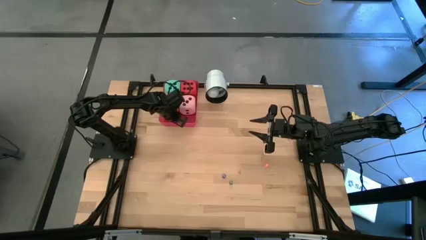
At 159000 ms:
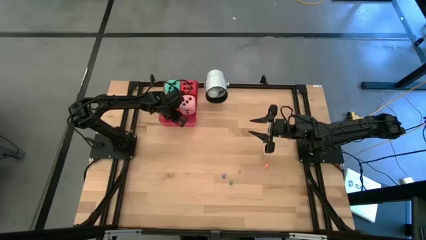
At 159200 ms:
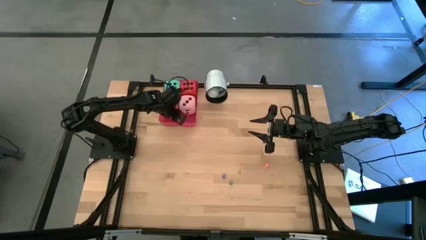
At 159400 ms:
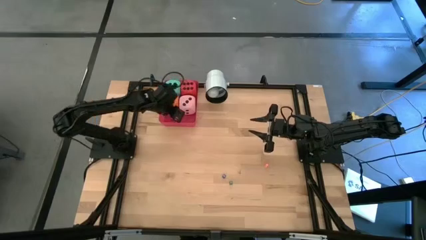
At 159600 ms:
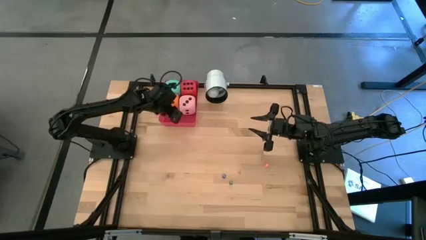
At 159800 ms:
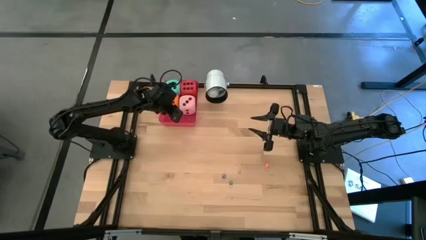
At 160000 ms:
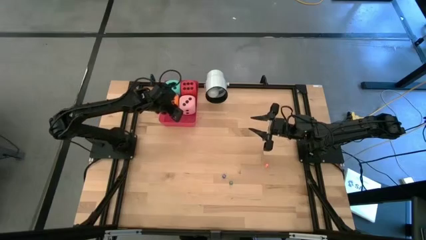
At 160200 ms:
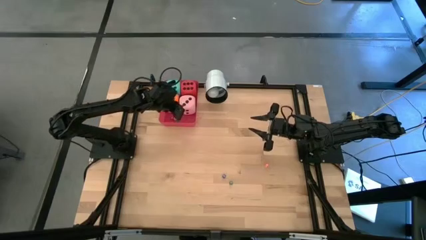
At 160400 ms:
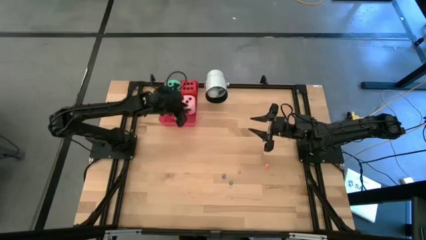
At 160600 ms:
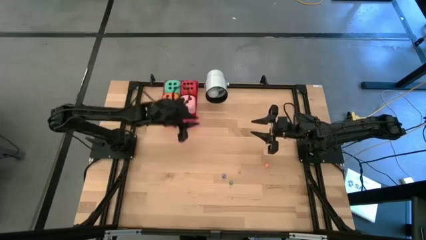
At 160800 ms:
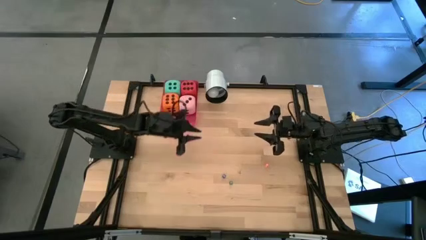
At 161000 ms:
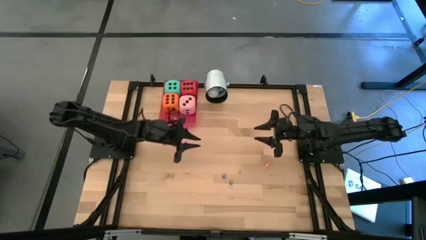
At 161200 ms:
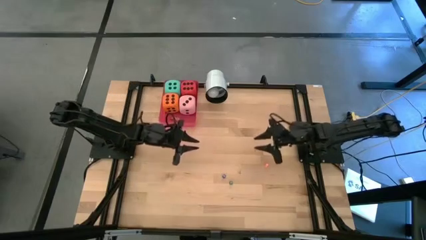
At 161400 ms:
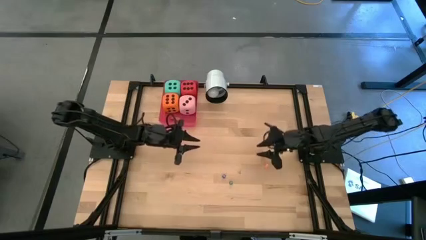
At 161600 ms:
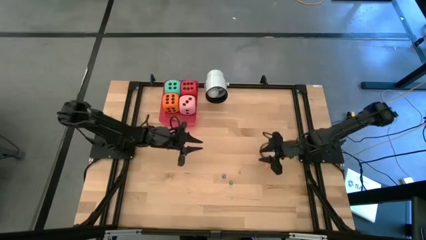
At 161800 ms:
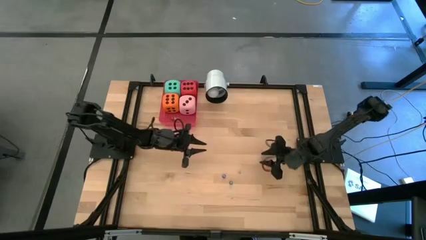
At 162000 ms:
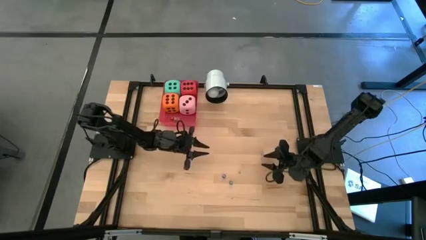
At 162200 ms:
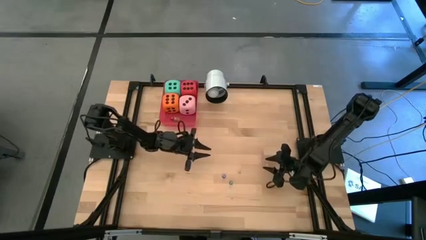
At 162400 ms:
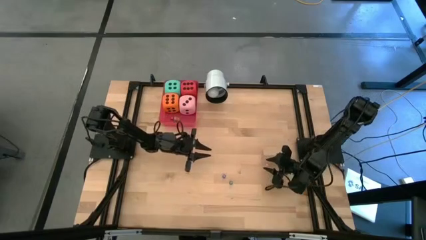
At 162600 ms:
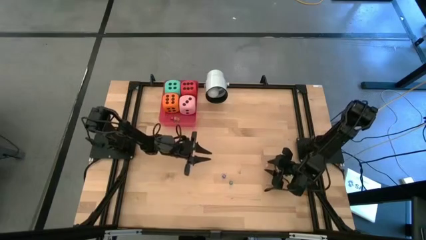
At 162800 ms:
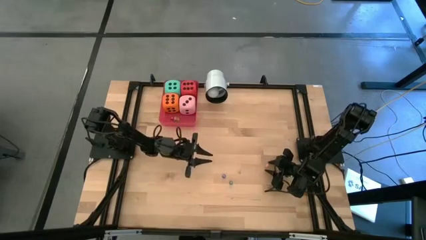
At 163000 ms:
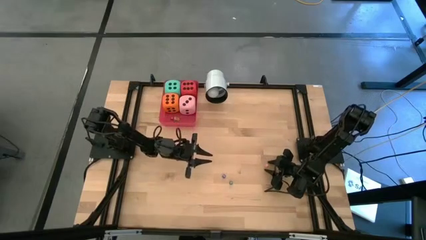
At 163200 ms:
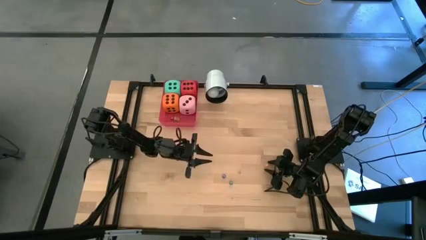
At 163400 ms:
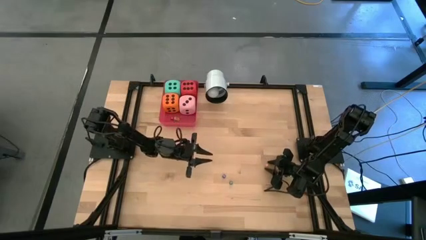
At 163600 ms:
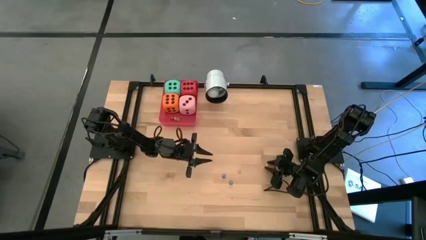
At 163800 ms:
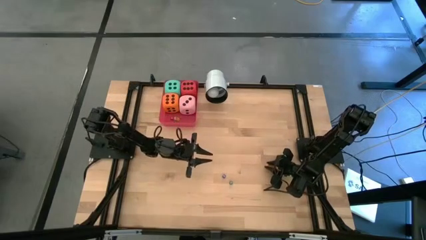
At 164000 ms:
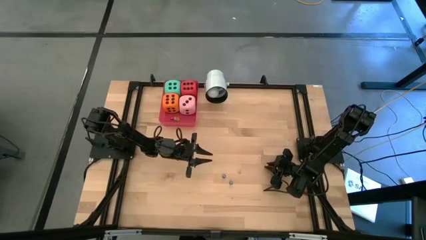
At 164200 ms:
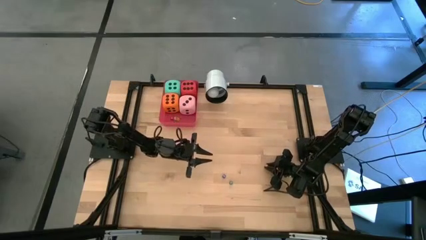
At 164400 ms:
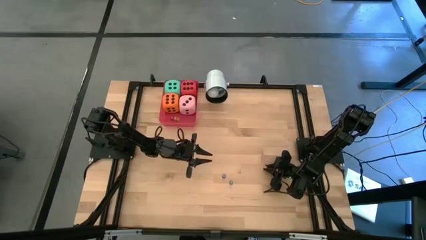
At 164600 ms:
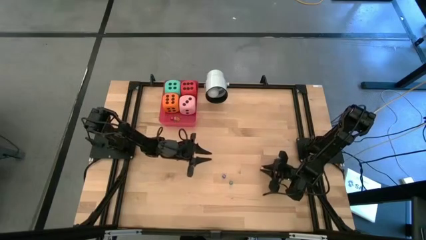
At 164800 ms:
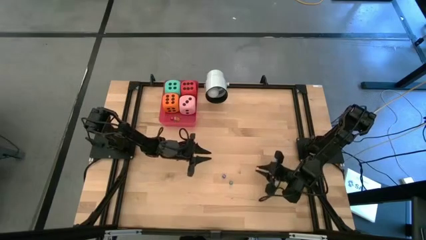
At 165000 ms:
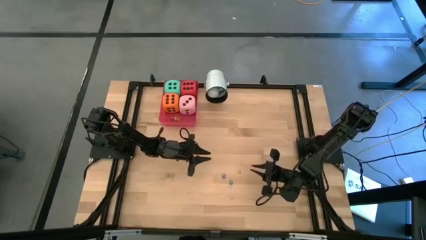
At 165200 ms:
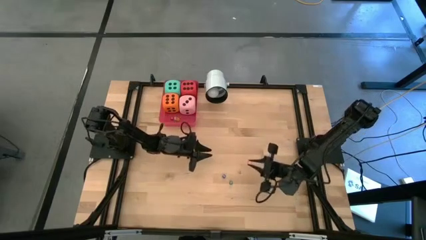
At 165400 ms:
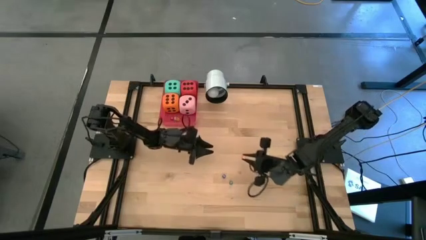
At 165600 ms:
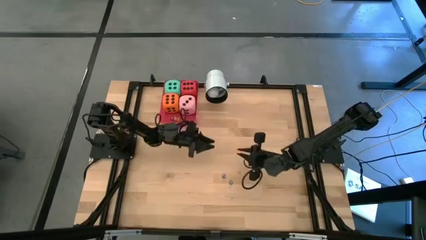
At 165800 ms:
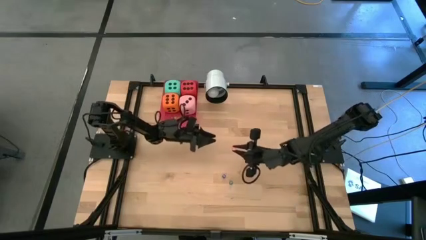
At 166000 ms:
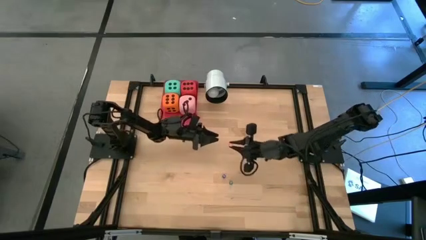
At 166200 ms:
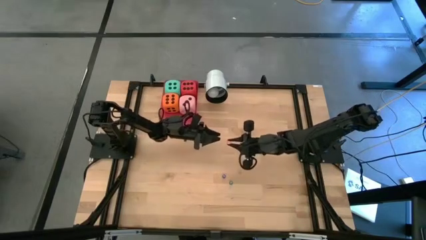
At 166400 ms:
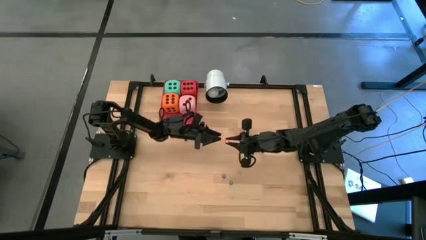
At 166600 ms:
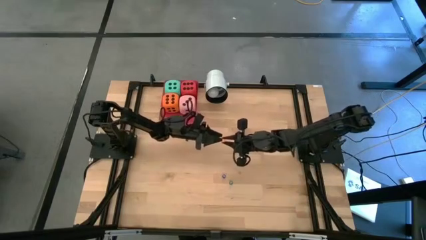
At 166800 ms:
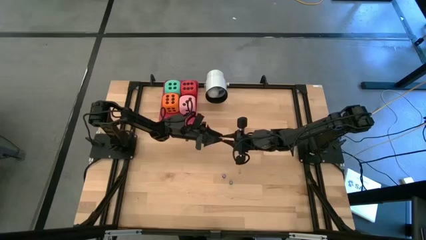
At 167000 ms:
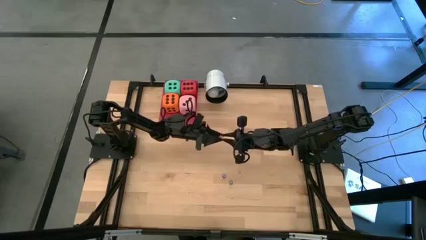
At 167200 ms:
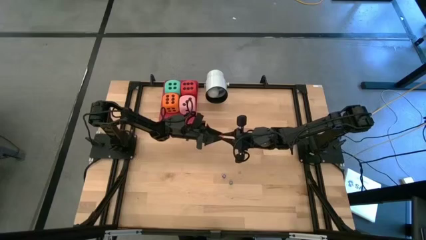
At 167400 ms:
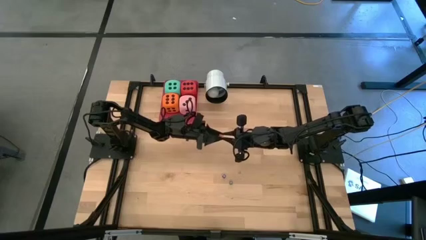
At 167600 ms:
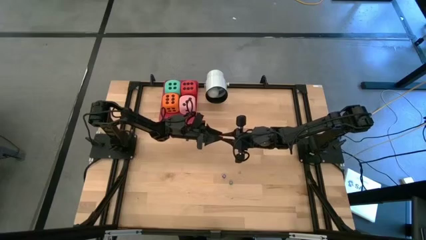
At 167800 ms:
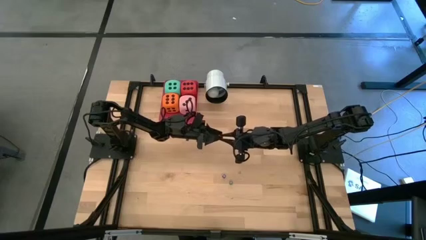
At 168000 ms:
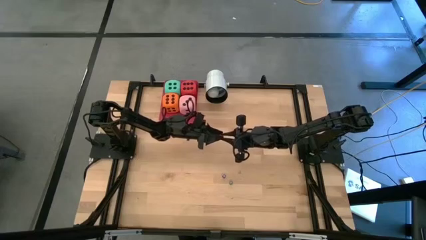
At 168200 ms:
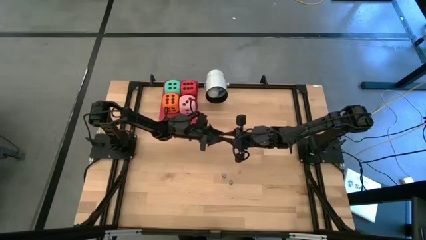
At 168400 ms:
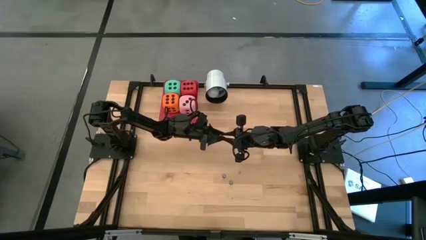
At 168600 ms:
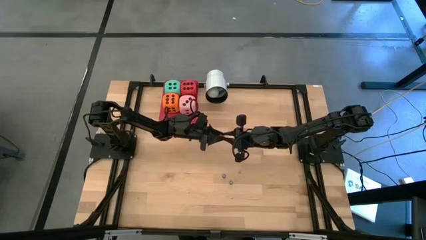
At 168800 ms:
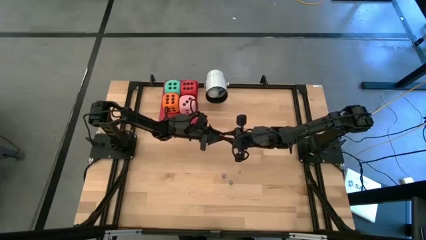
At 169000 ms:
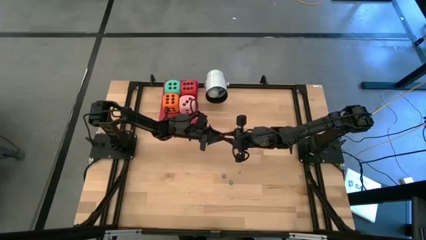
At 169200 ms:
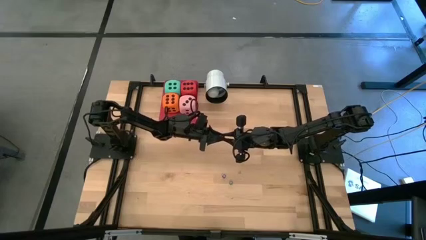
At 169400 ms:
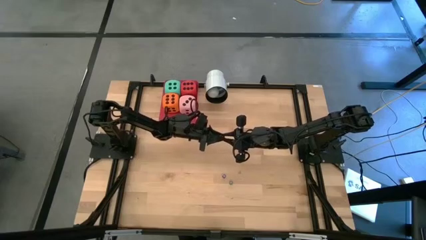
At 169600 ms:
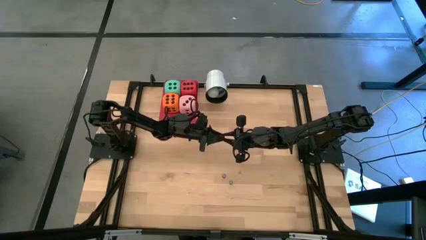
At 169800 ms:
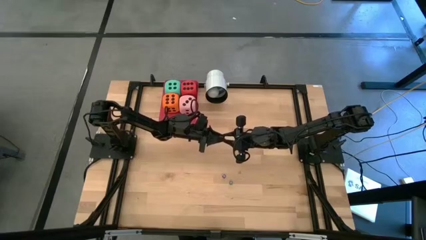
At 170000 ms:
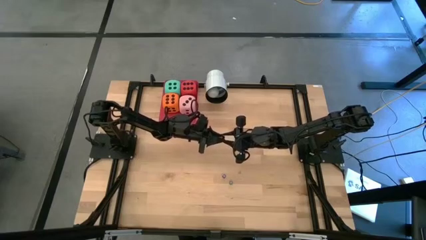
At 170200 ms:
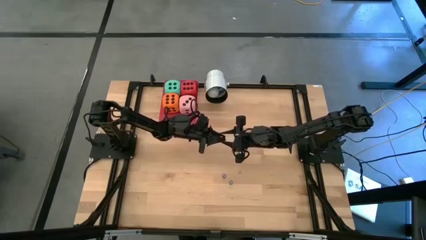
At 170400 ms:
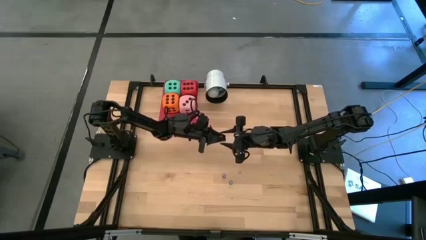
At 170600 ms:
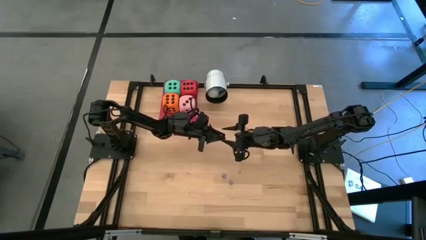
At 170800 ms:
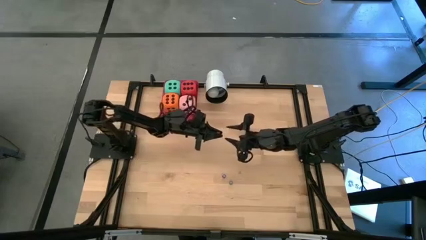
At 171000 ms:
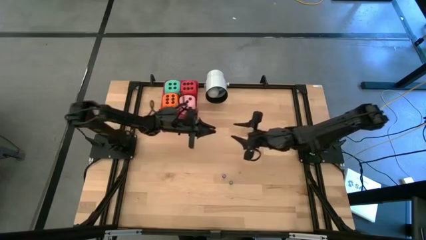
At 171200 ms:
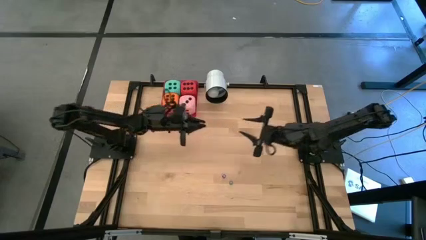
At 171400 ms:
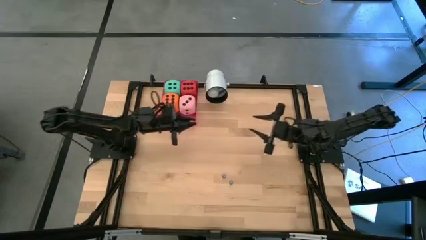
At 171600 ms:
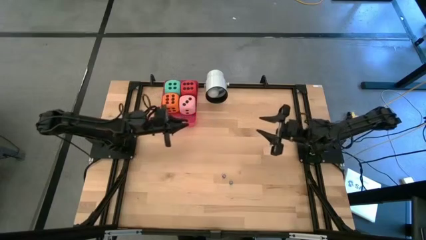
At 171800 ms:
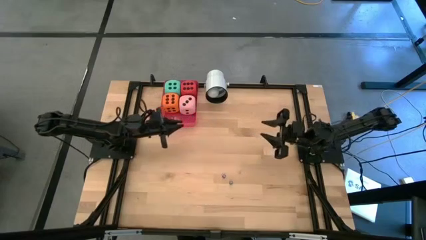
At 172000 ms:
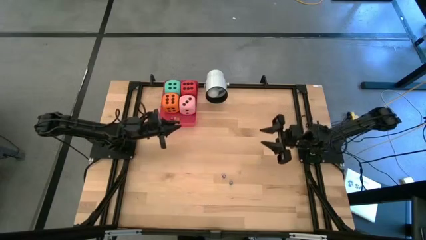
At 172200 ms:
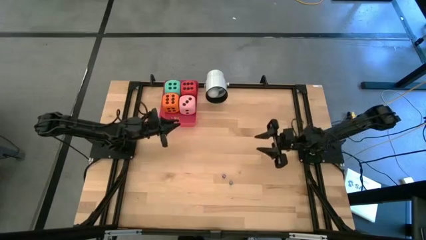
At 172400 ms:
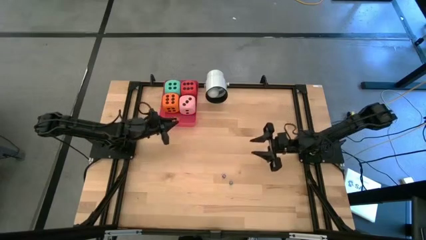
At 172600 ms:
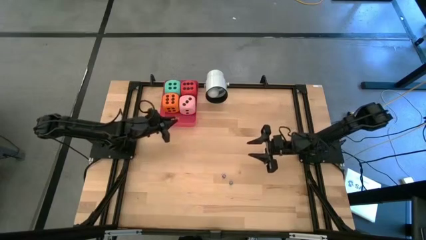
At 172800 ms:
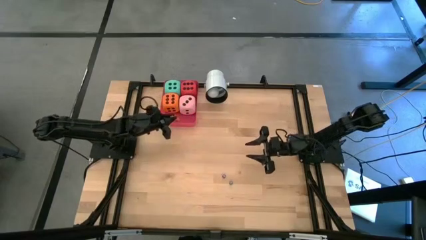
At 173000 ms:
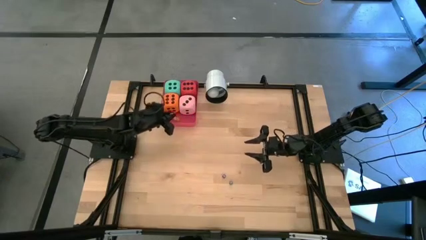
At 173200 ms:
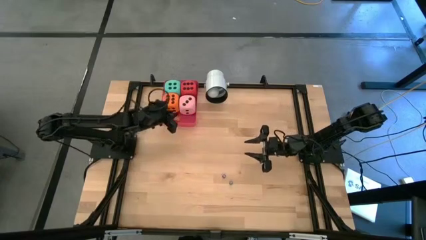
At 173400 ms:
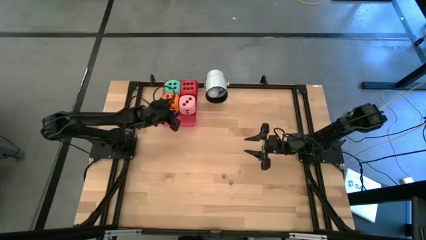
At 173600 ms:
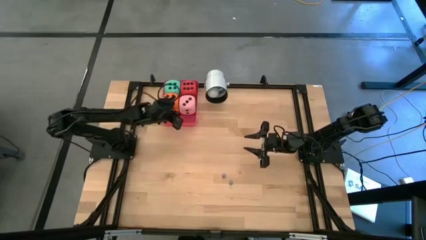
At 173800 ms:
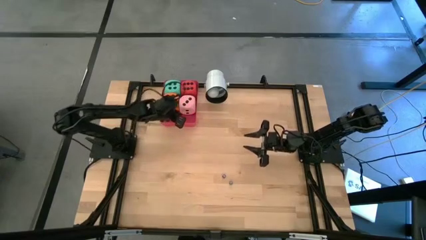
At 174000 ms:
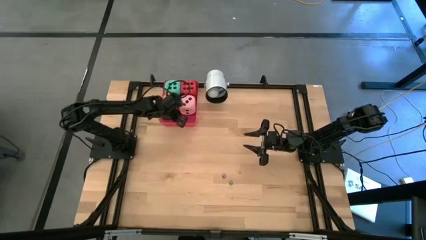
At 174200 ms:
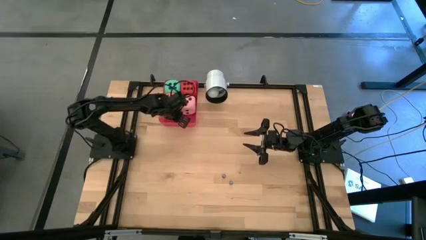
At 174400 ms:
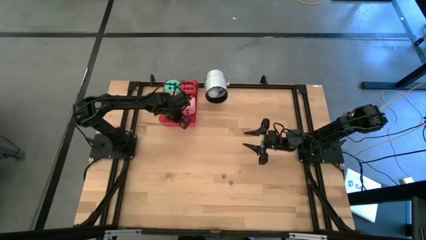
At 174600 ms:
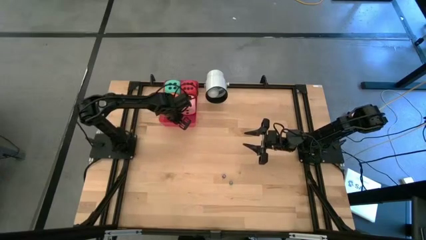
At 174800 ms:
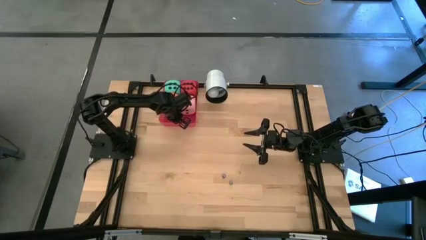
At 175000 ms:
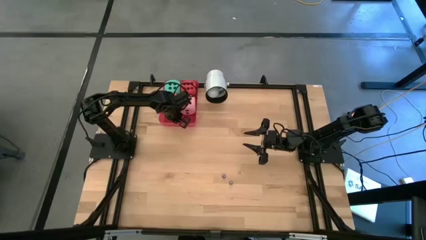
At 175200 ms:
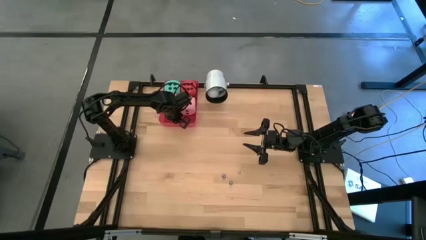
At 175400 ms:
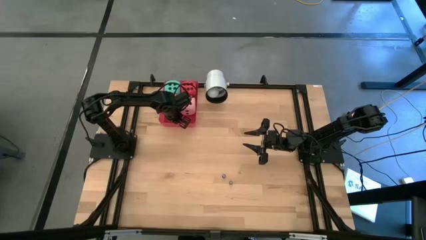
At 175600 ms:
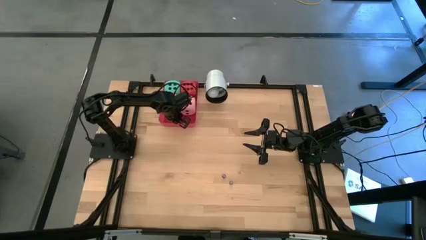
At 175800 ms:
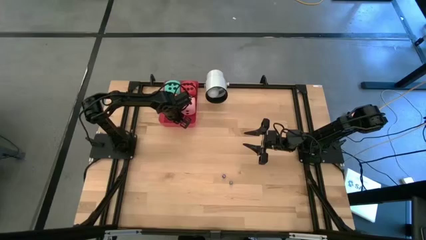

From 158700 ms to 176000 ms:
Task: Pick & Place Dice
Put the small orange dice into the red bin
